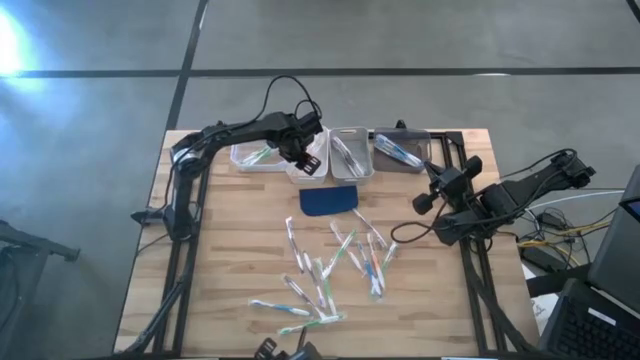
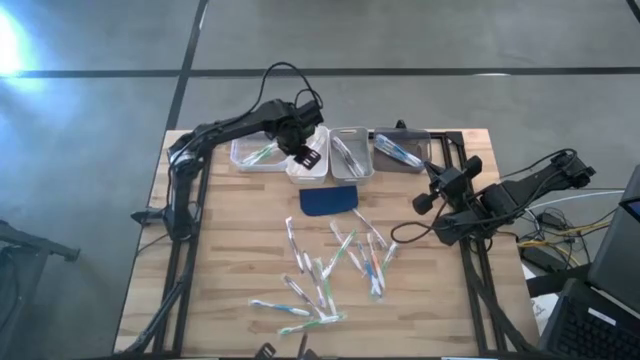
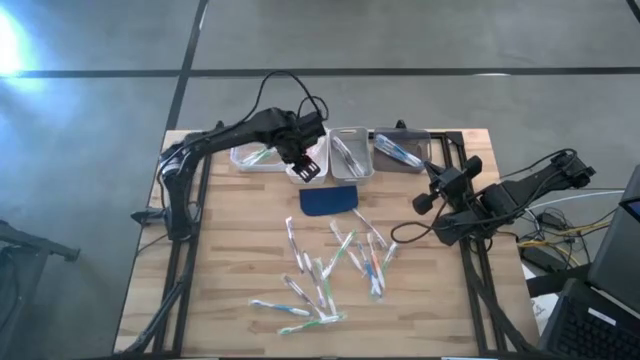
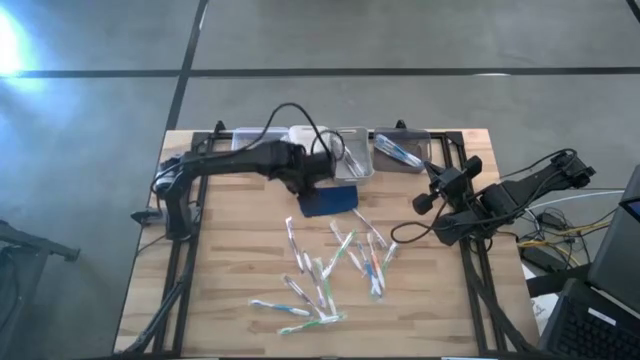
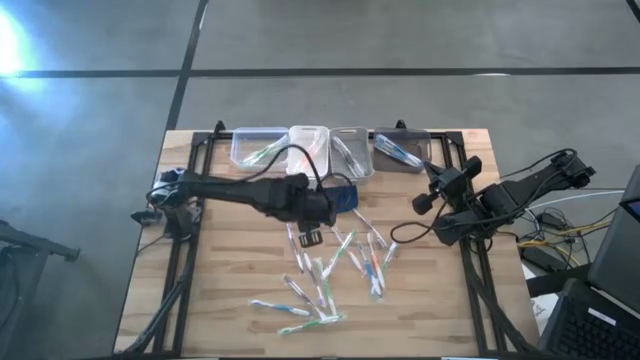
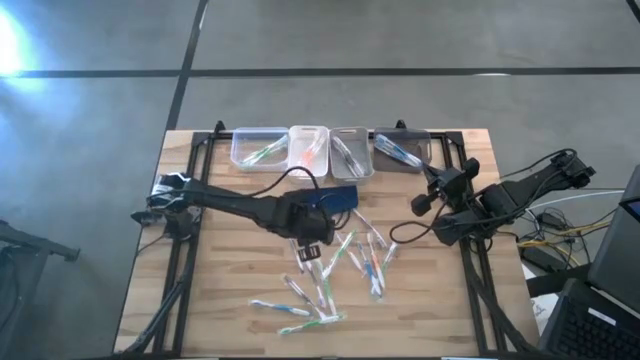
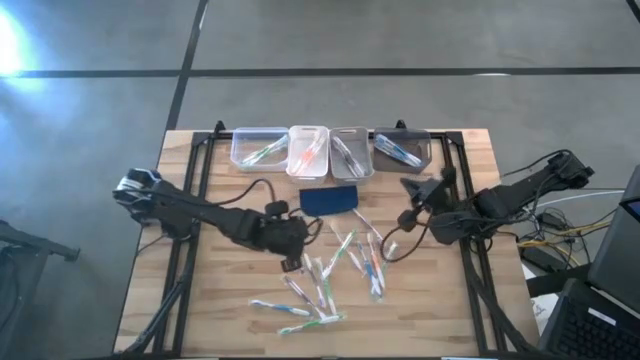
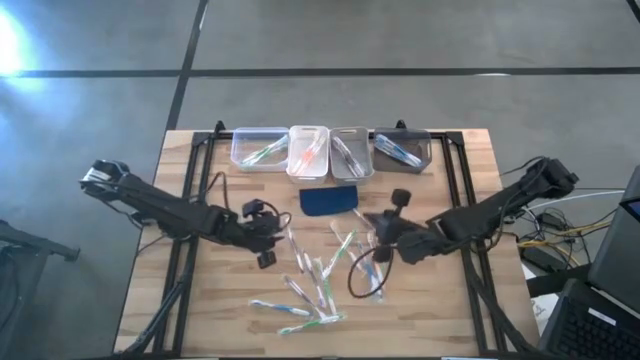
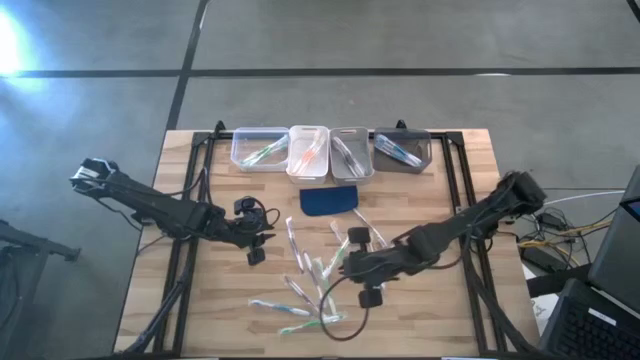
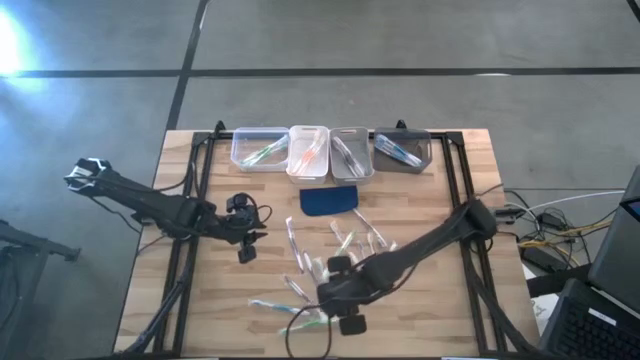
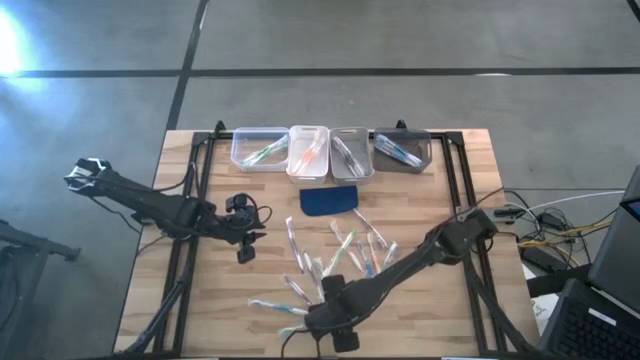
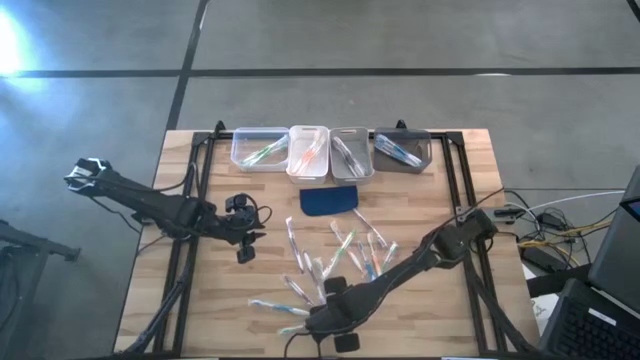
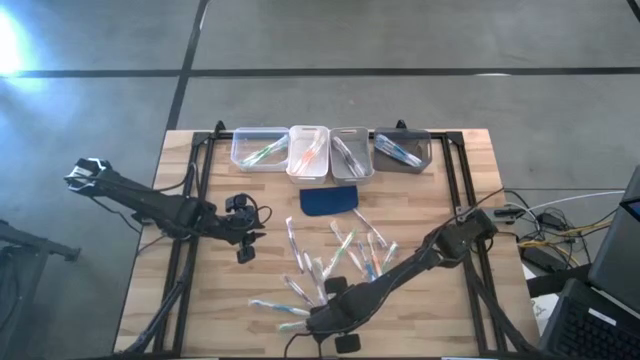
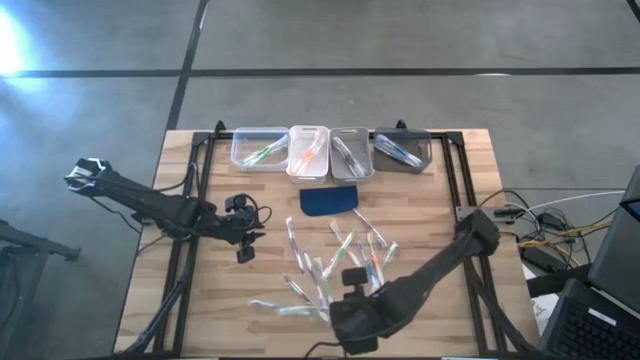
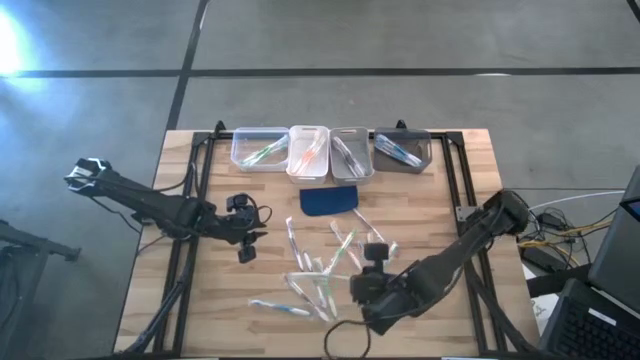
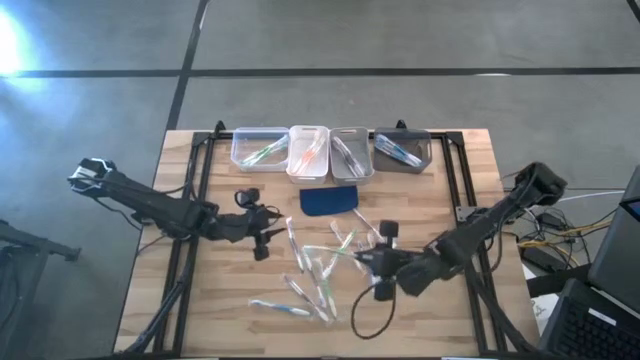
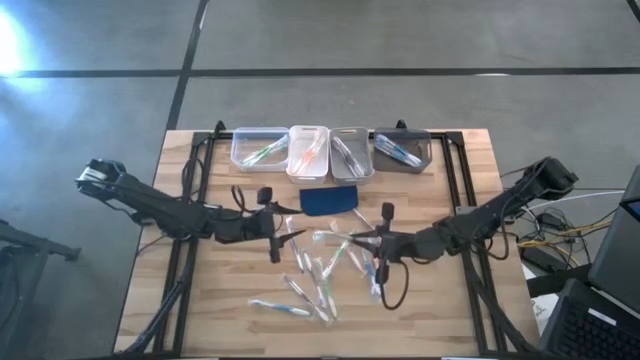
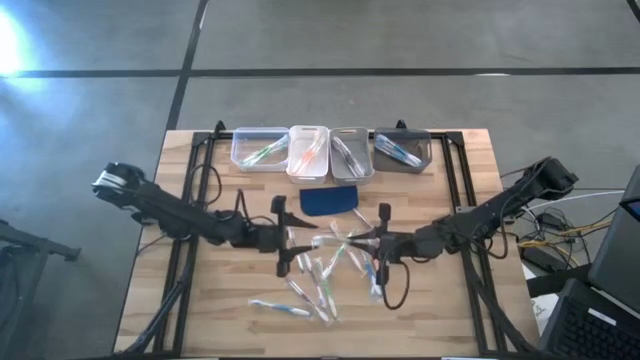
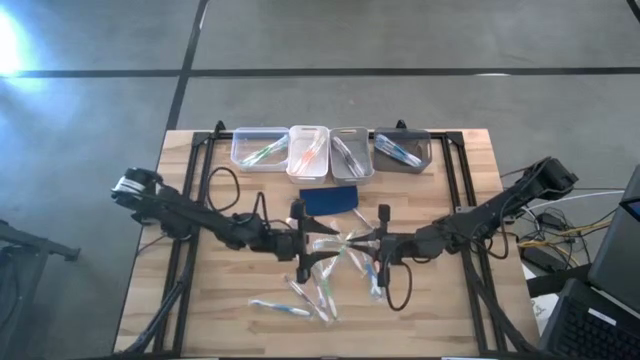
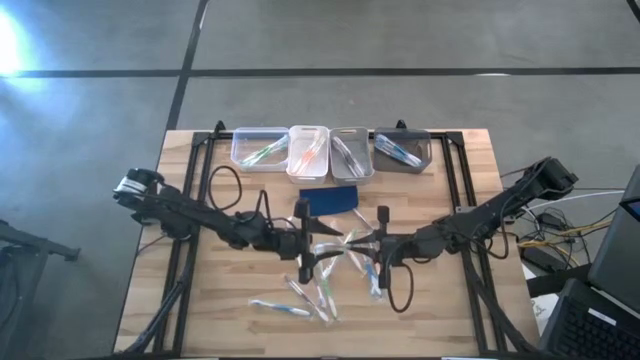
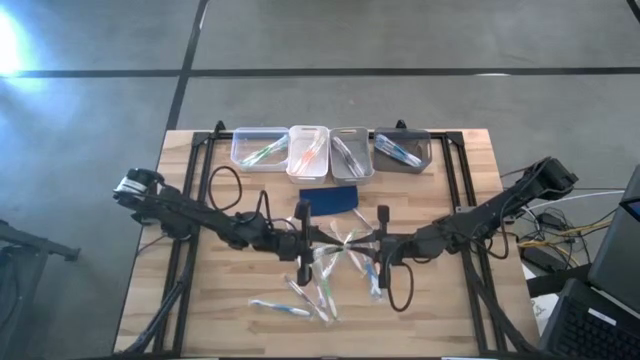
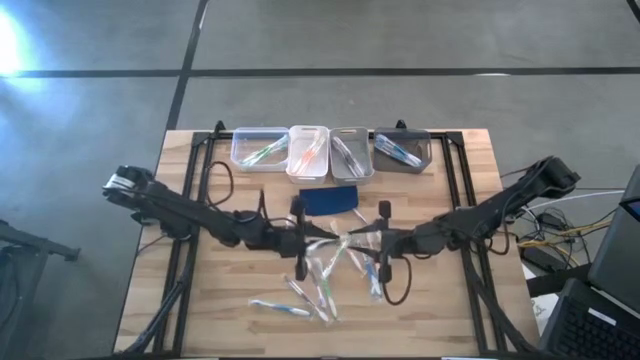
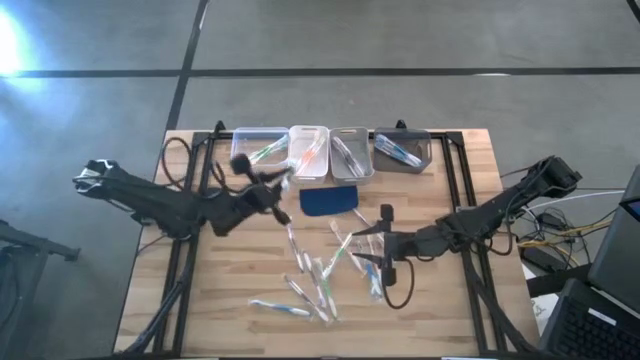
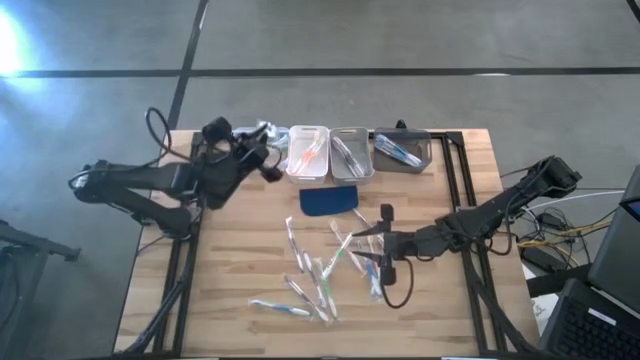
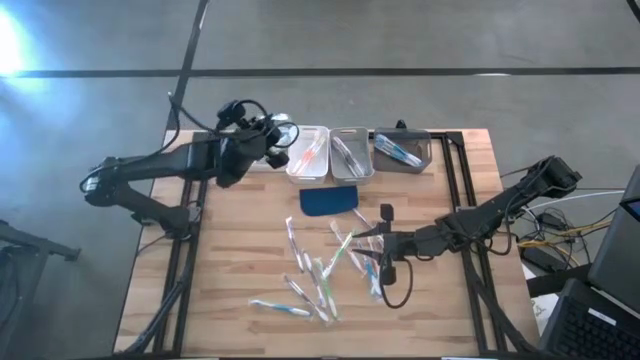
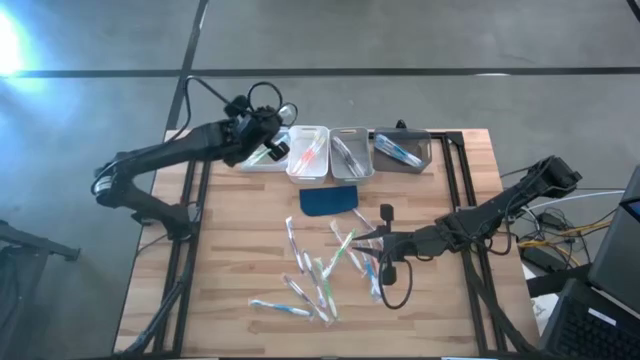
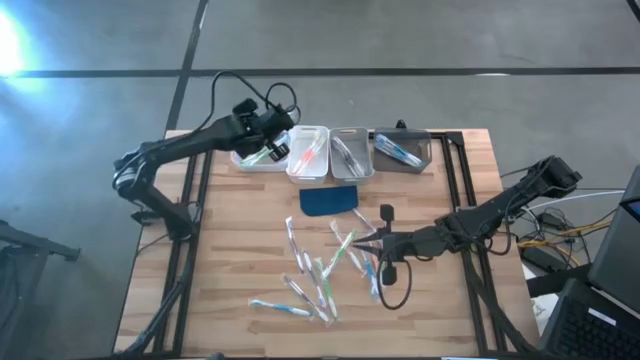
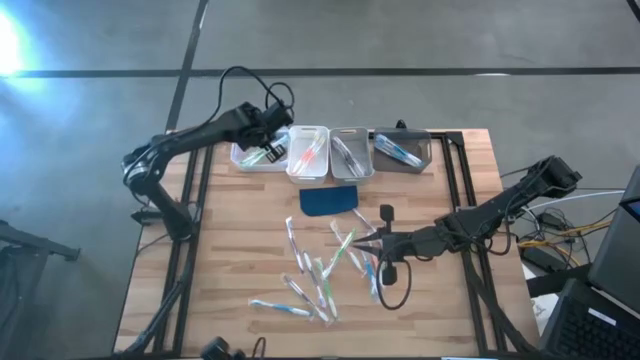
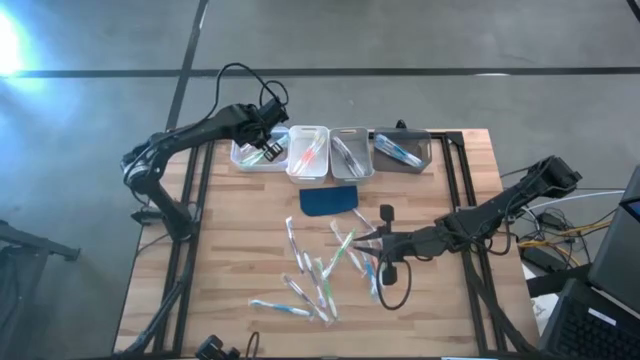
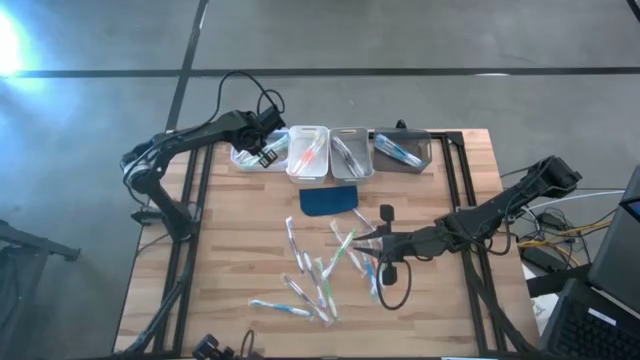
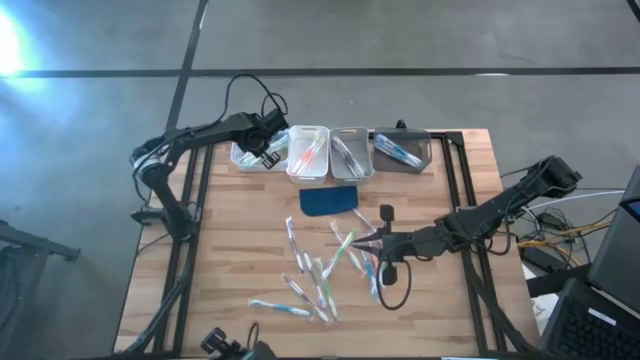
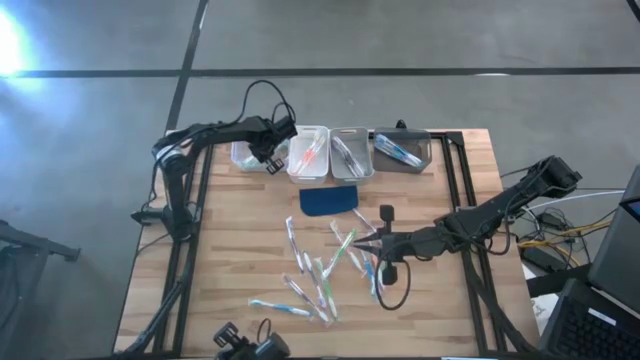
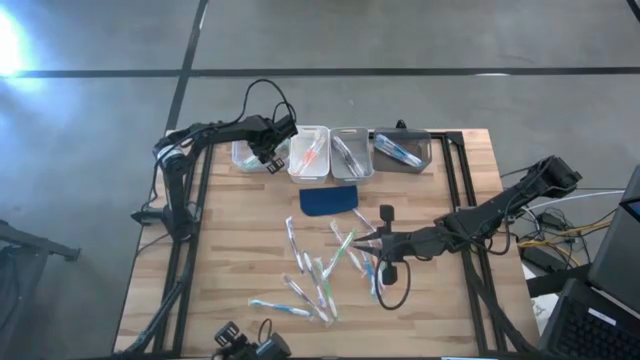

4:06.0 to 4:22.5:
Task: Pick & Place Toothbrushes
Put the green toothbrush into the transparent bin

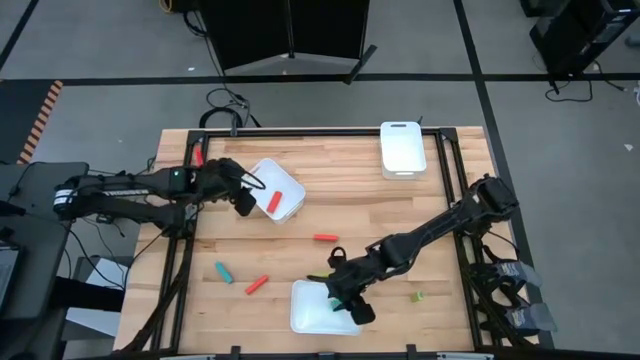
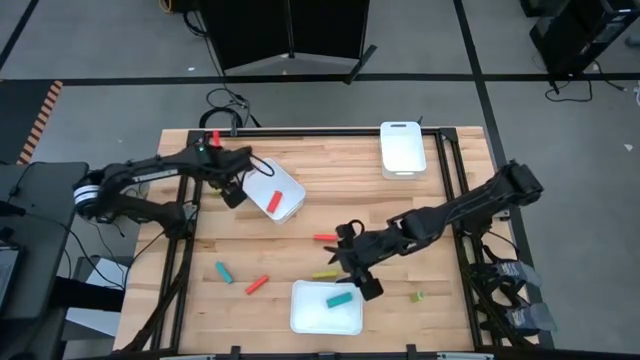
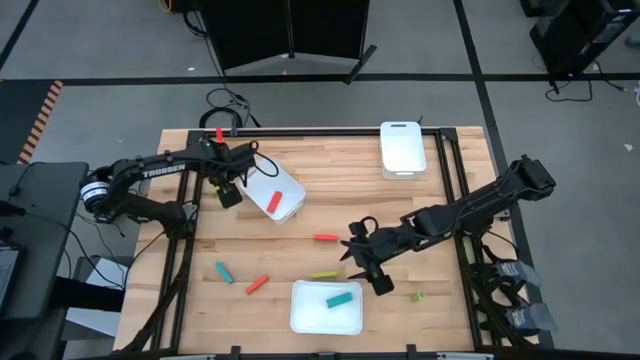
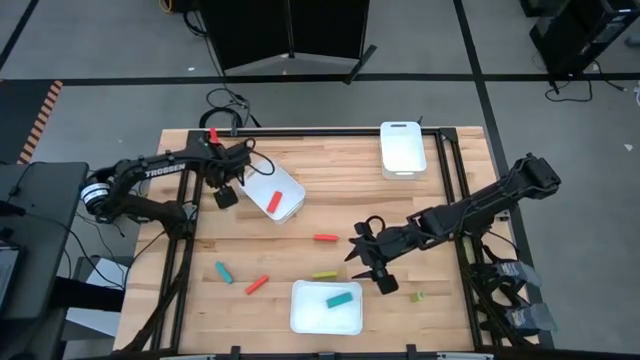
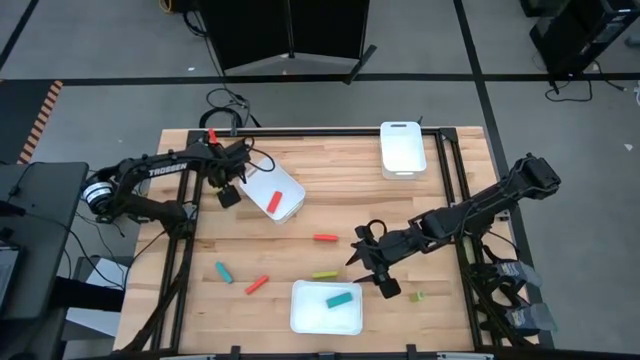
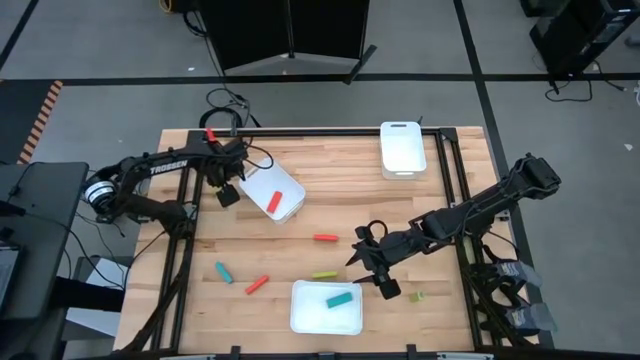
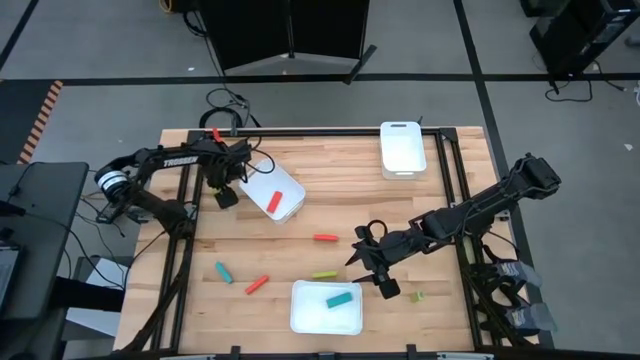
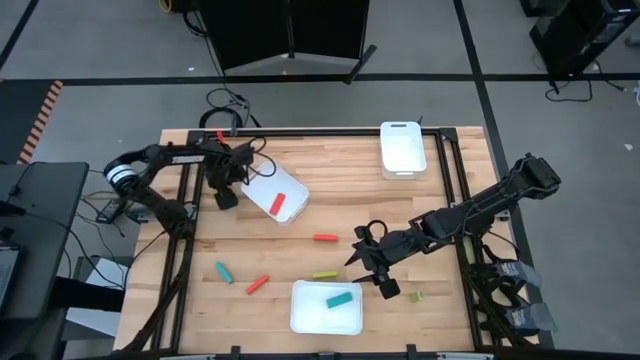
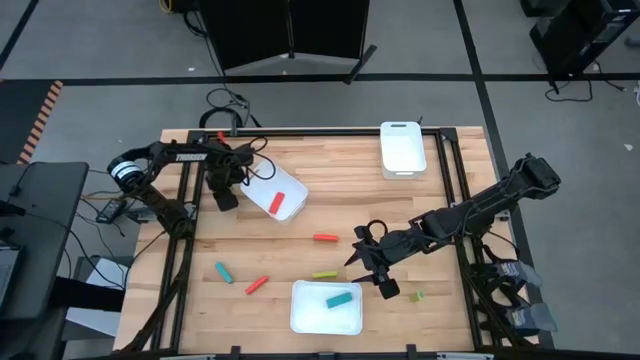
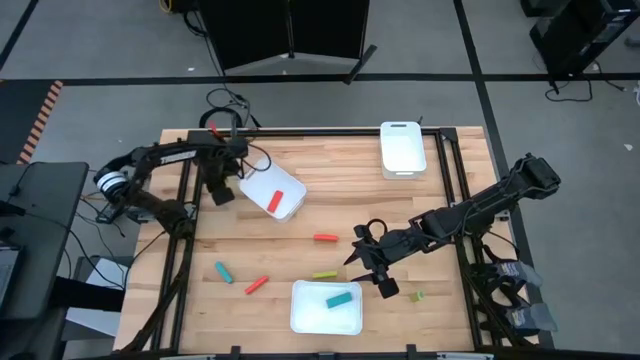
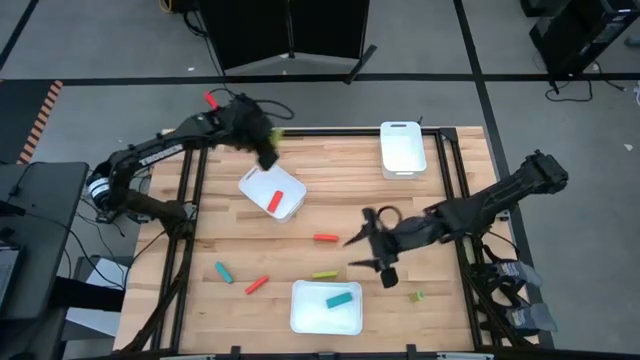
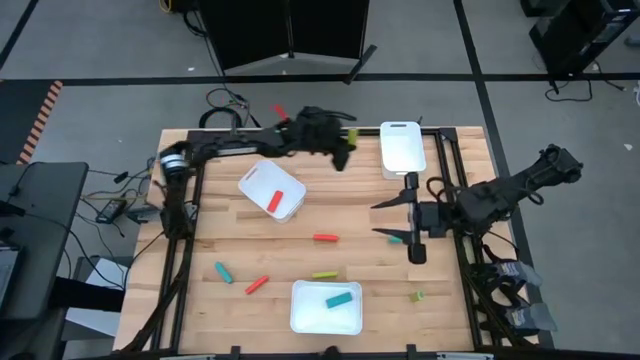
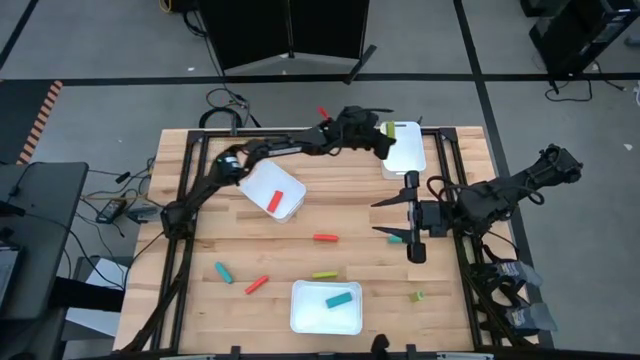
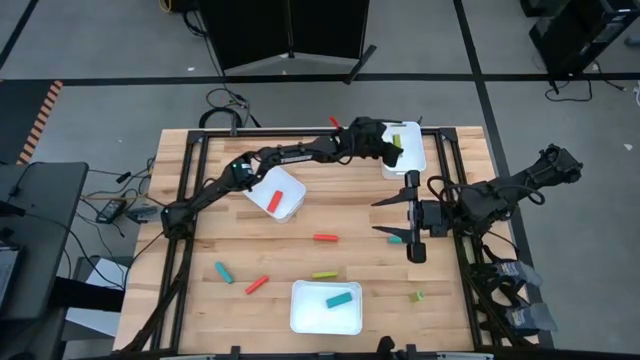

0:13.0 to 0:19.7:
Task: Sort blocks
Put the top left green block into the top right bin
